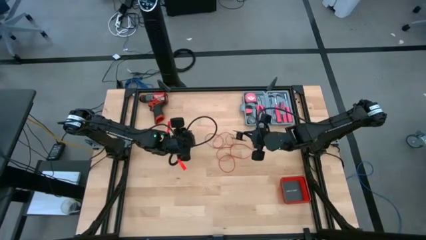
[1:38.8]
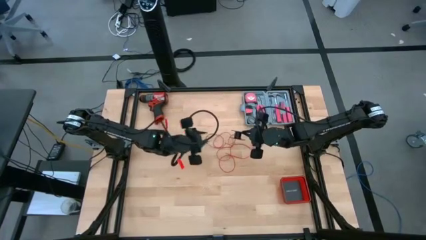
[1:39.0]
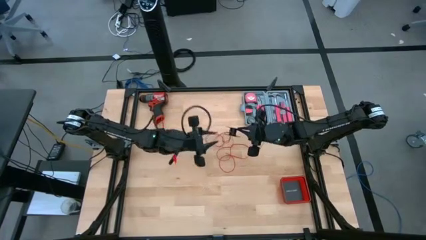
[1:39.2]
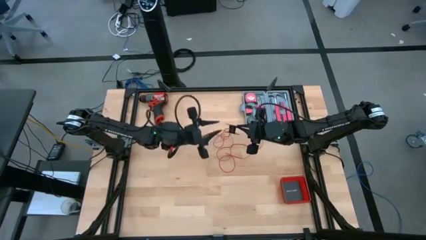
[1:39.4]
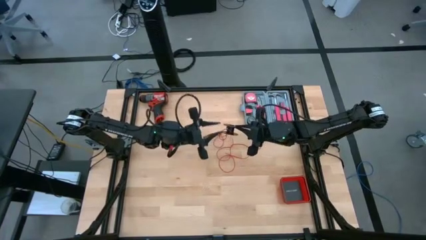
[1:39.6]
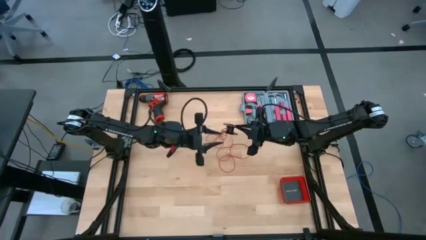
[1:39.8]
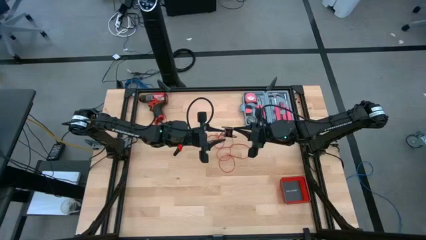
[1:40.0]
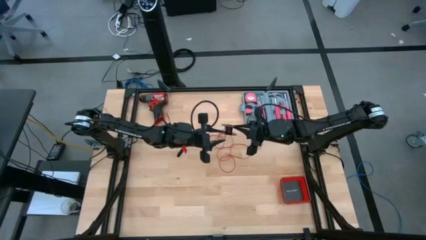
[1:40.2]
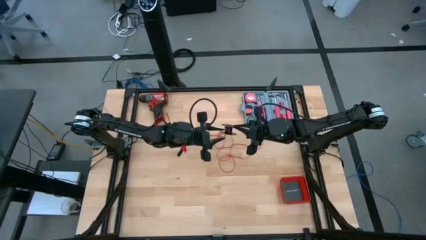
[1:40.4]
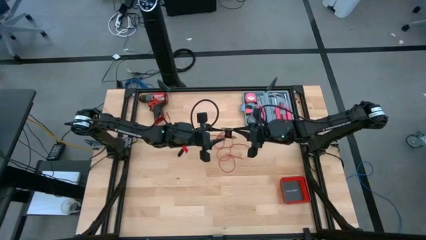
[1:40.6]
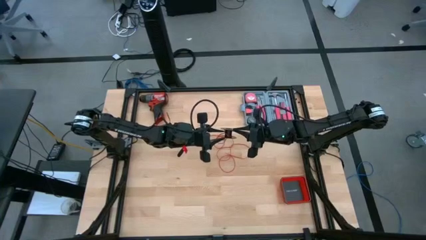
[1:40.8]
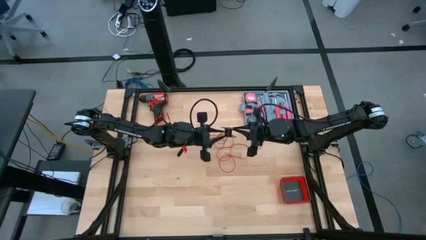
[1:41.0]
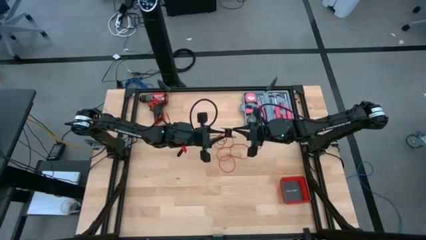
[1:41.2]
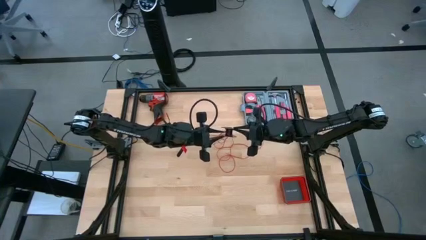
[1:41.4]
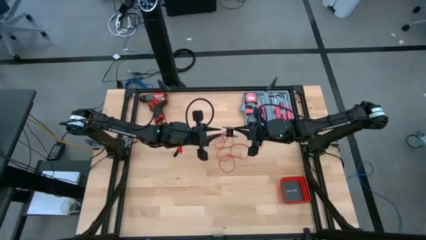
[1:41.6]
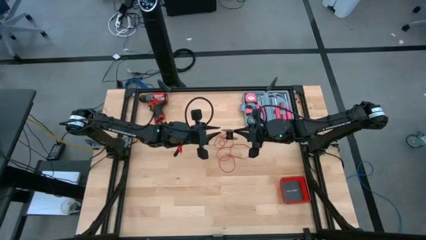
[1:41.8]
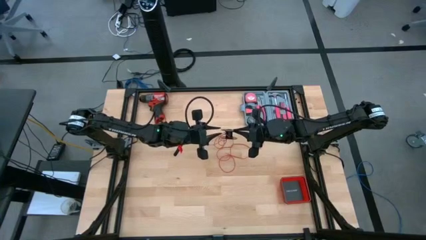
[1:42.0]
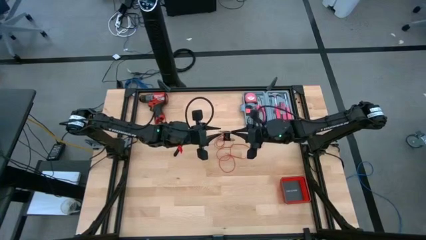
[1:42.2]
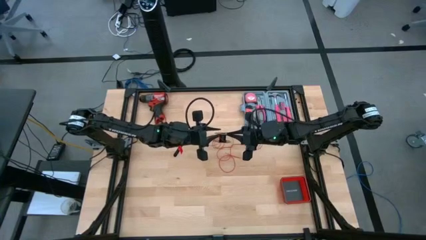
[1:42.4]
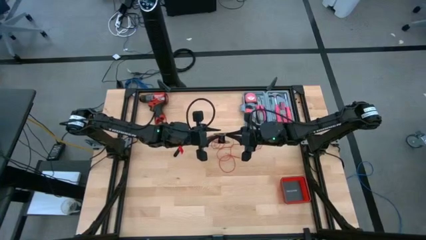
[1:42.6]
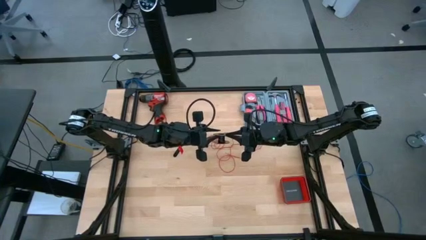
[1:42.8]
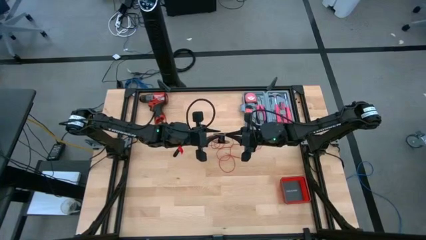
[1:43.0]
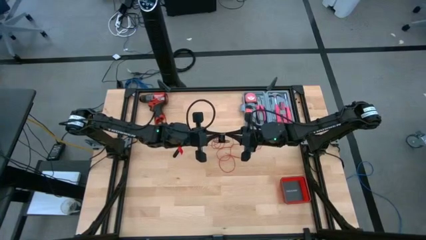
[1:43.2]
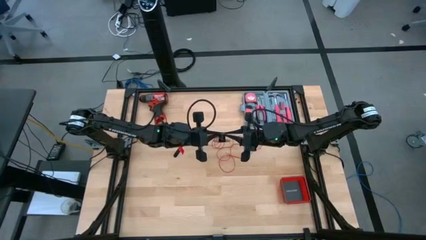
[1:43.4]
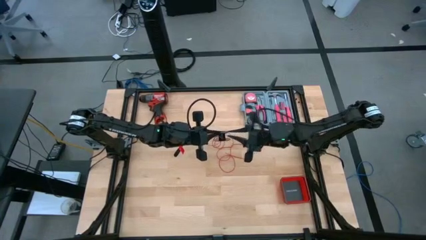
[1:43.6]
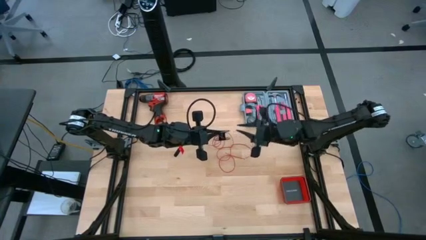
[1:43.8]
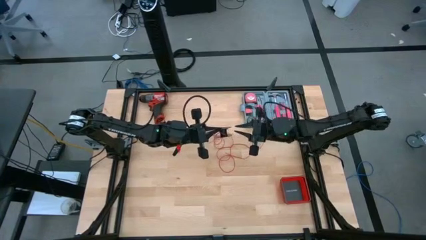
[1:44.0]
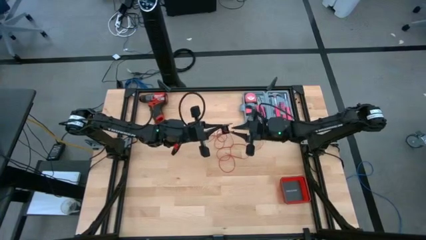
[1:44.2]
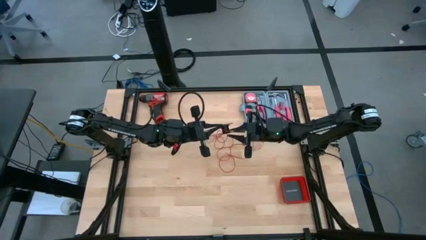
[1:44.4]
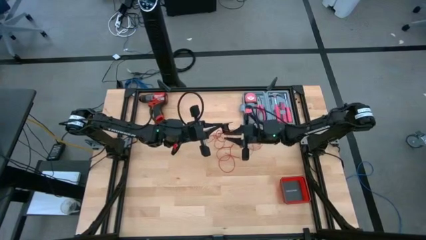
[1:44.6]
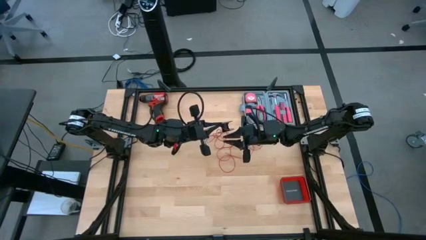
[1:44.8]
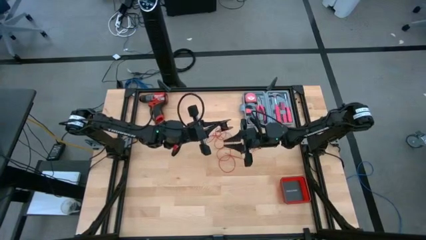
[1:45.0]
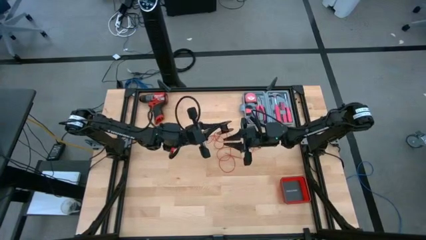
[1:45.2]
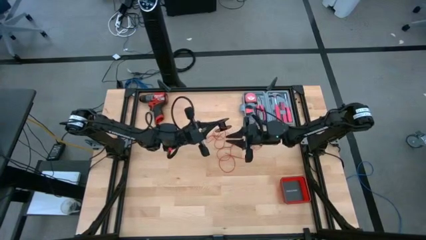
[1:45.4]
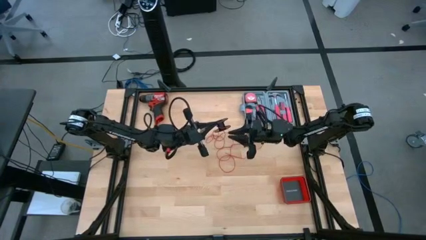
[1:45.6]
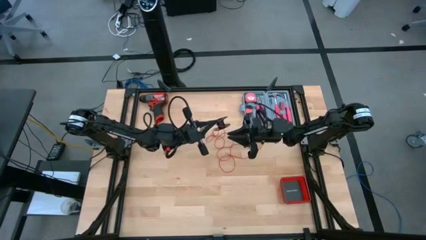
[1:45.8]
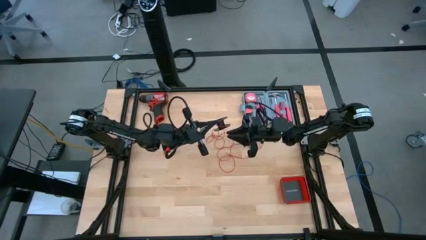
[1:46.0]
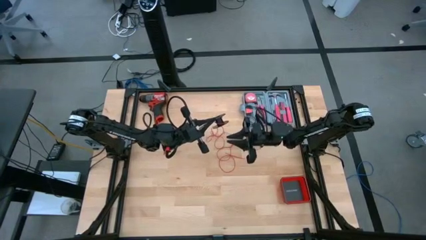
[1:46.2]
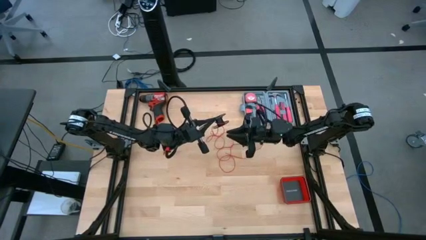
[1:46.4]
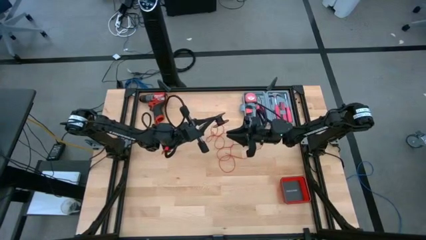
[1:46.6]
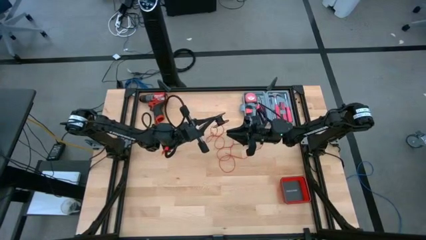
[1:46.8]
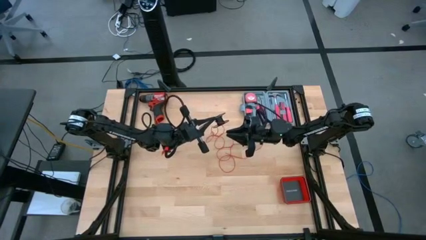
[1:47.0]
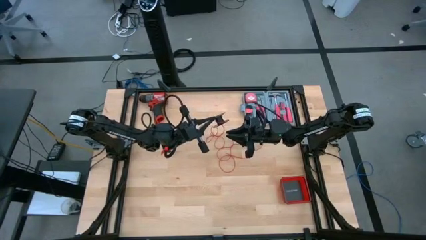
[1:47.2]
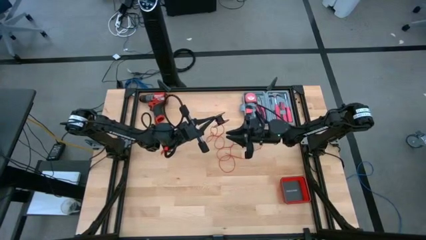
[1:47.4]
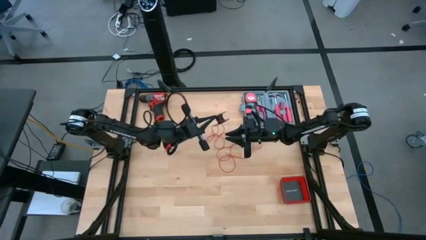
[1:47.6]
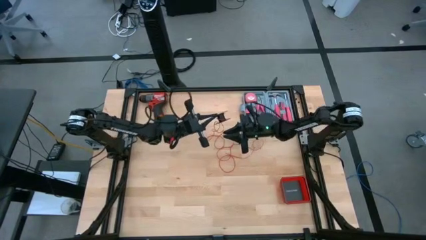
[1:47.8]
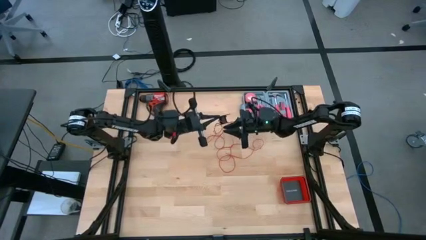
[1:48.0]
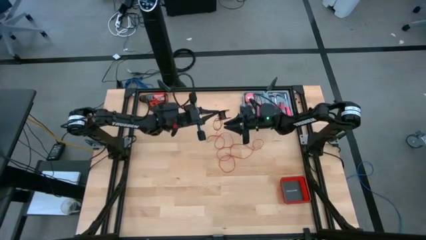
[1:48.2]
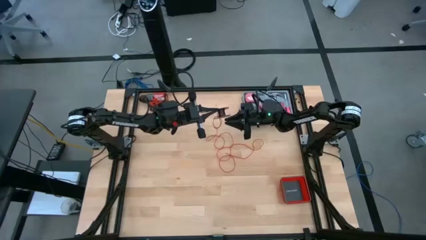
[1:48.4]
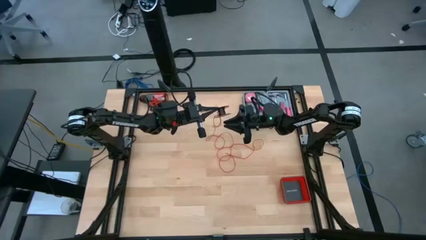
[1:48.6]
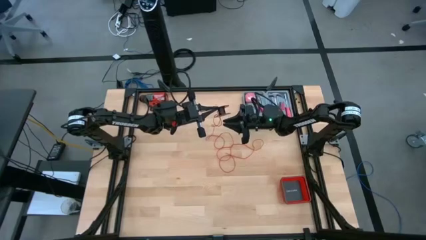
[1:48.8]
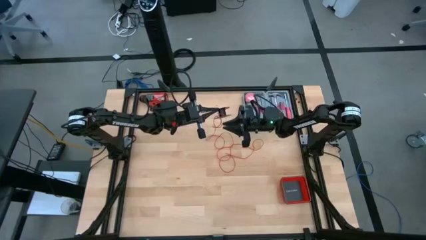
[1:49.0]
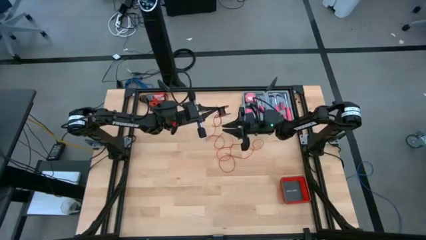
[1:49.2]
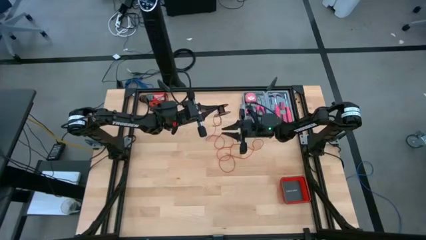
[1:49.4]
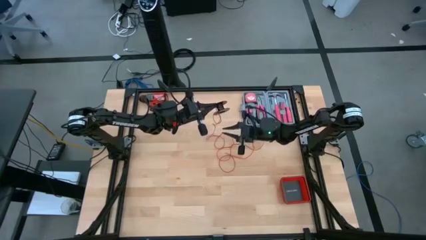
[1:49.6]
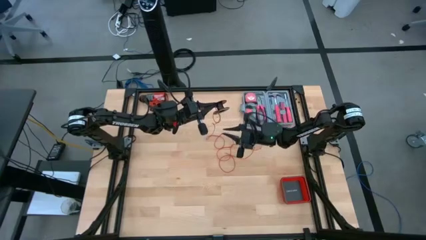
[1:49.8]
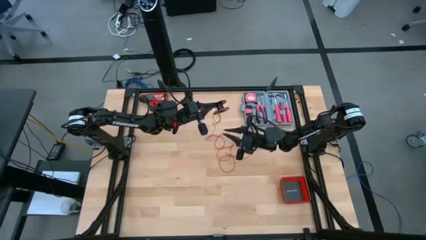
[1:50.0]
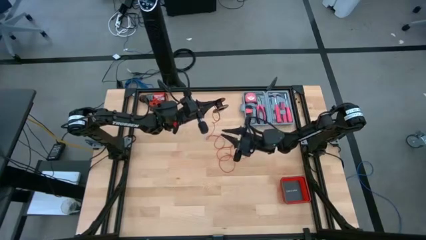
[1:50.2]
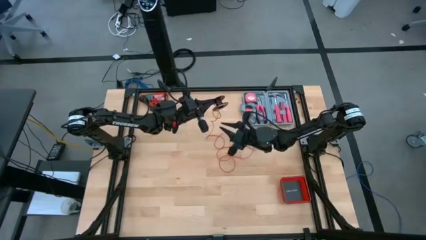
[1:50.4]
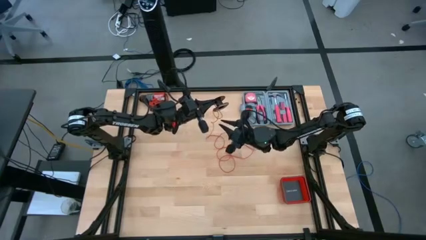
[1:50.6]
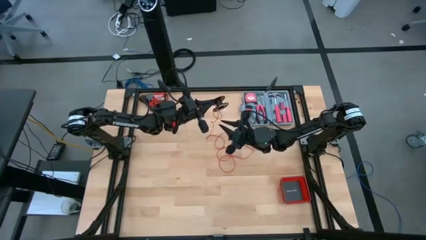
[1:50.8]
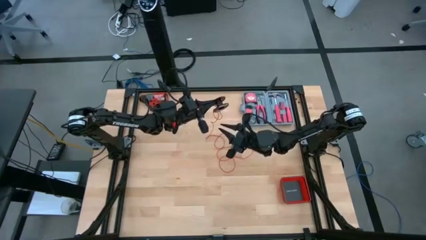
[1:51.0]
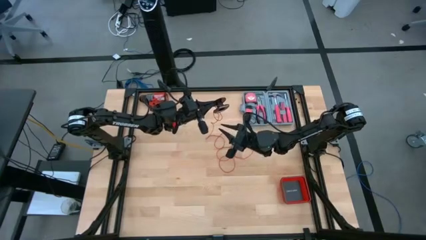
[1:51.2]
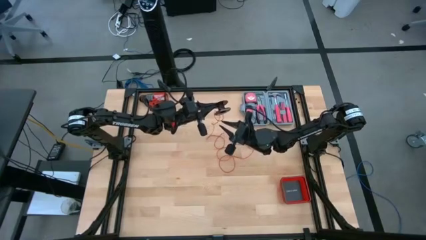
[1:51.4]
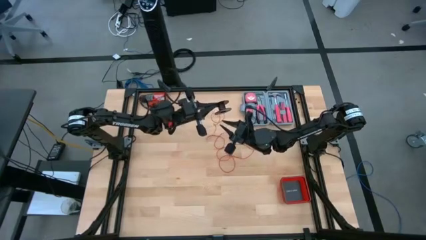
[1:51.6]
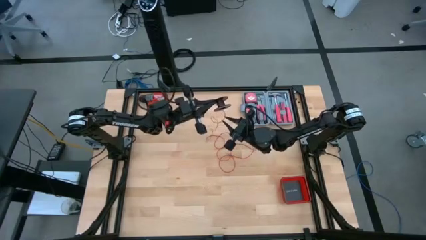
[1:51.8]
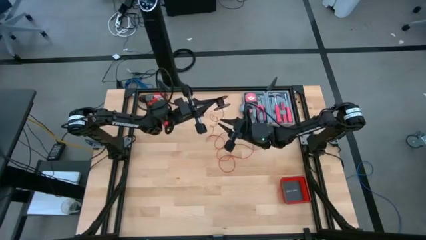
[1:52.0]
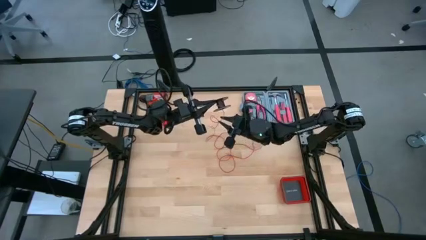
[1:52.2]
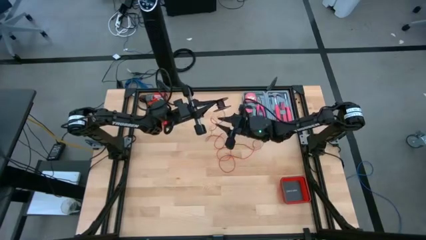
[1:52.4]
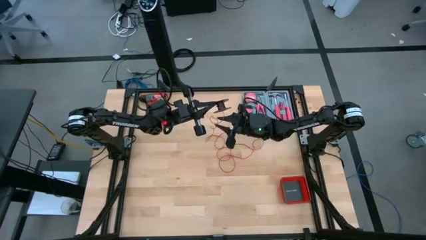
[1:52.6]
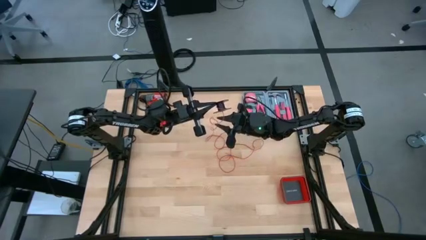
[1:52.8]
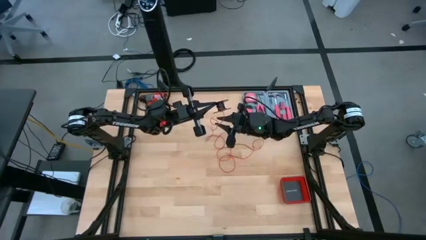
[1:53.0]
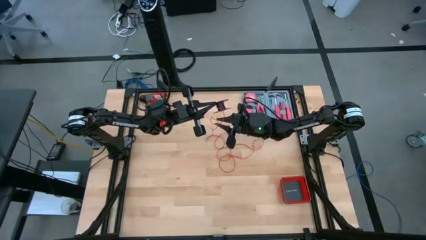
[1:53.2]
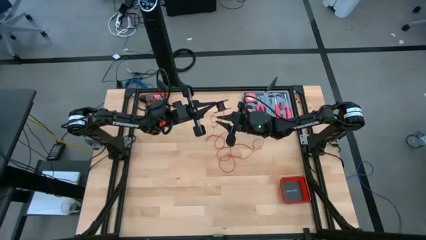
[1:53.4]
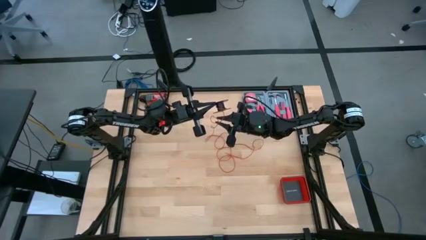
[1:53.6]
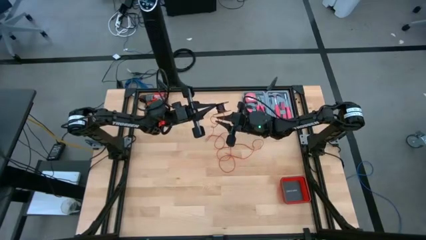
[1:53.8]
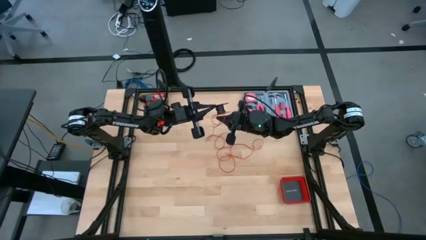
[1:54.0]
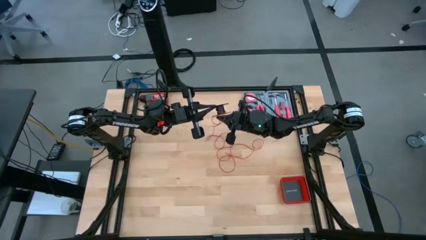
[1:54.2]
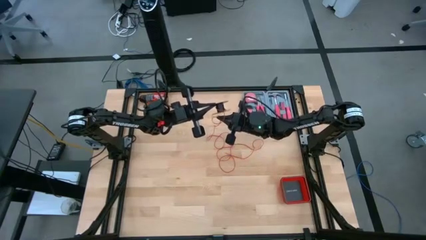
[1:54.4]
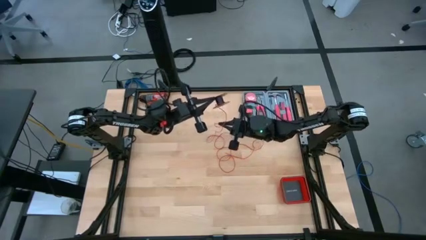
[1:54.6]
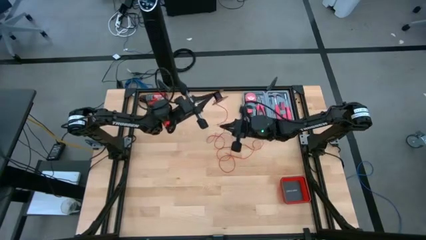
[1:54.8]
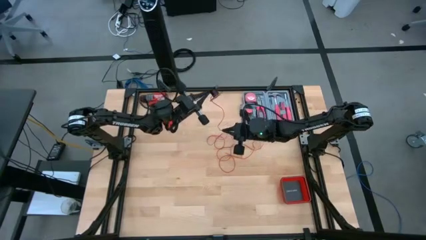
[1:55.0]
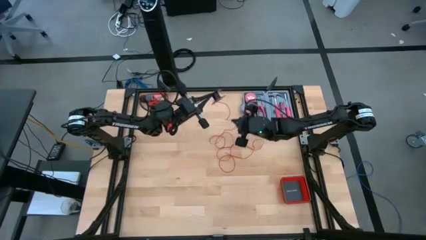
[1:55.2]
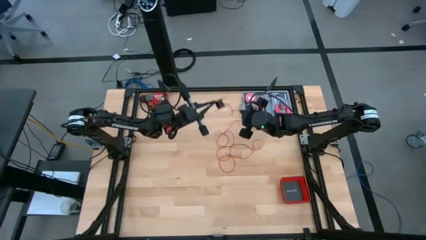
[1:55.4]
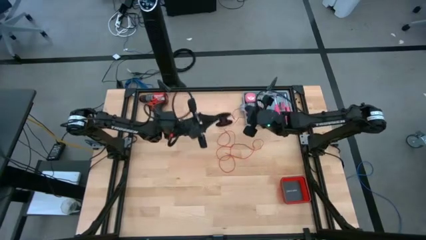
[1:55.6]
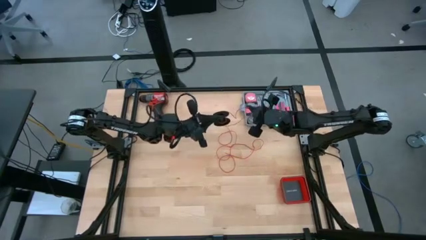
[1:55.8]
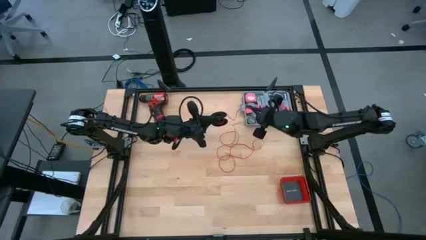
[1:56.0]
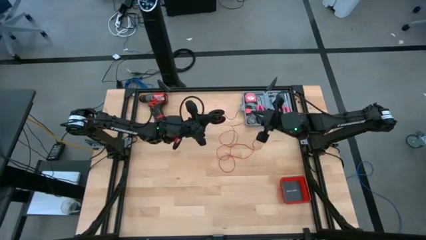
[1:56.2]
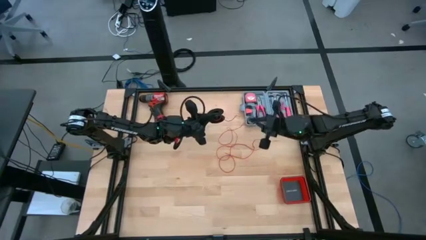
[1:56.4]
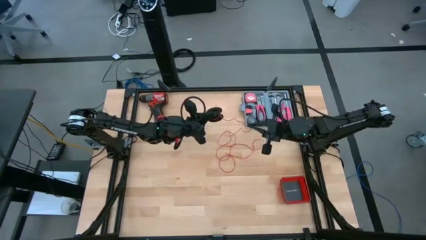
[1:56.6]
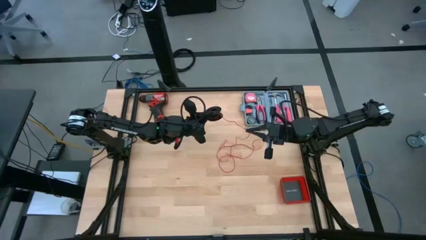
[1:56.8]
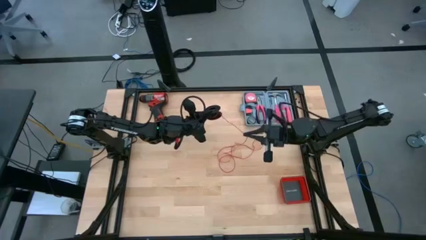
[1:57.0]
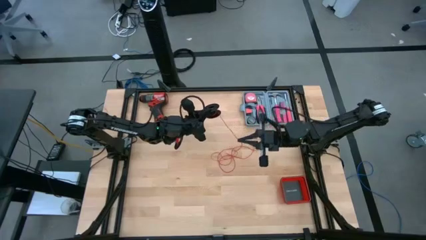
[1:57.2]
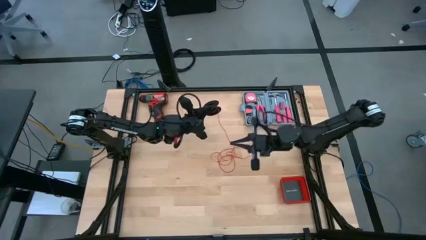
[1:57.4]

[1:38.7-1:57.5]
Task: Coil cords
Coil the red wire on the black spool
